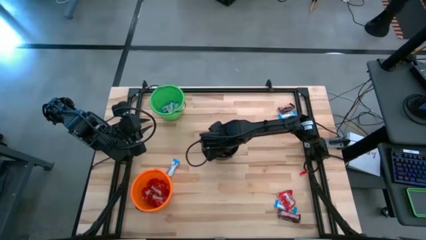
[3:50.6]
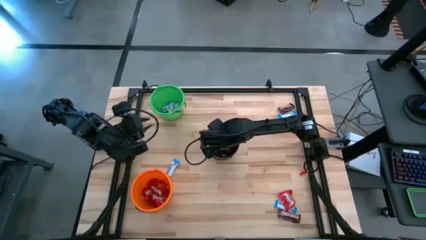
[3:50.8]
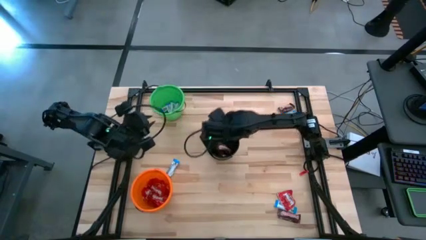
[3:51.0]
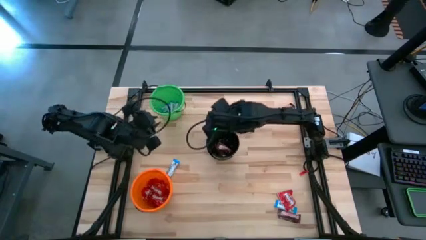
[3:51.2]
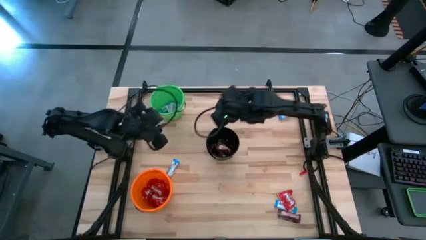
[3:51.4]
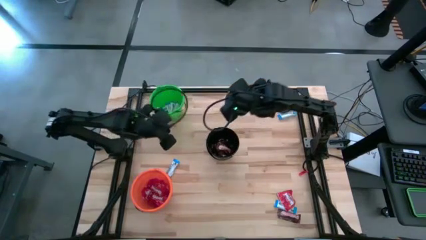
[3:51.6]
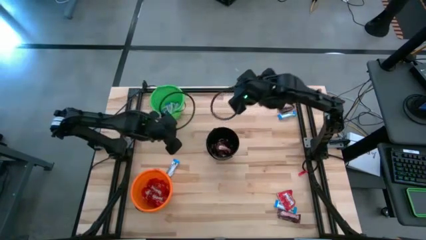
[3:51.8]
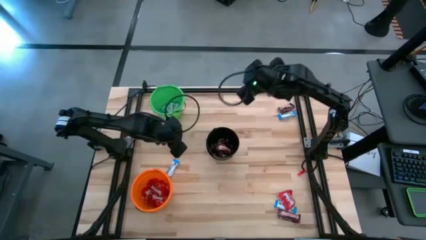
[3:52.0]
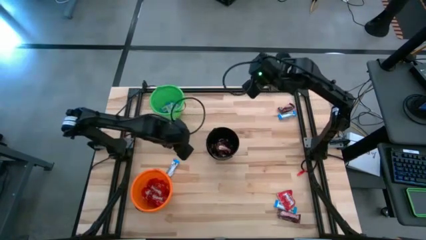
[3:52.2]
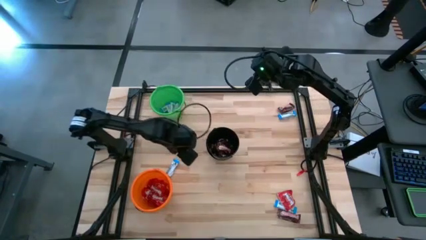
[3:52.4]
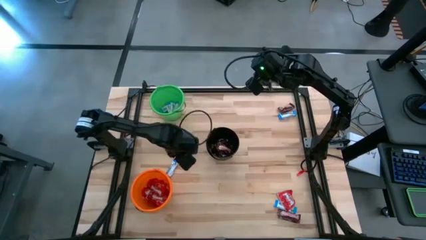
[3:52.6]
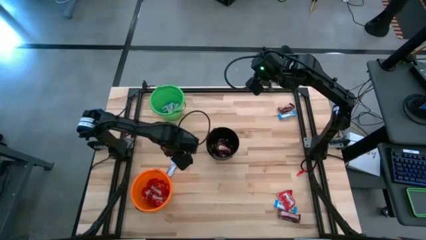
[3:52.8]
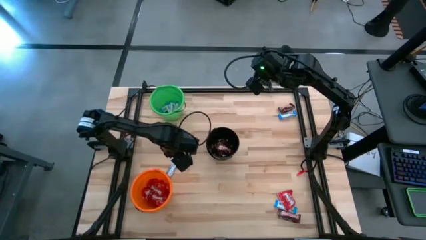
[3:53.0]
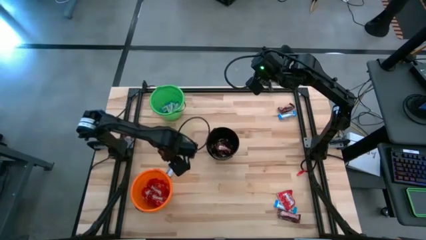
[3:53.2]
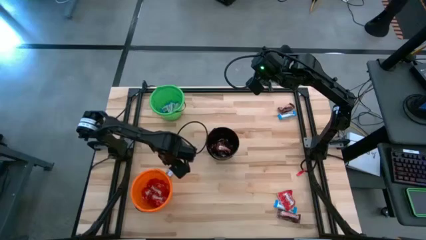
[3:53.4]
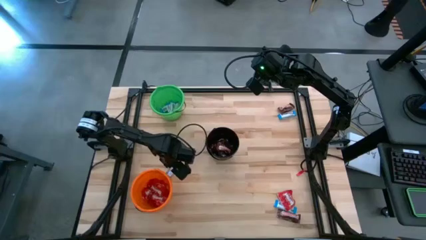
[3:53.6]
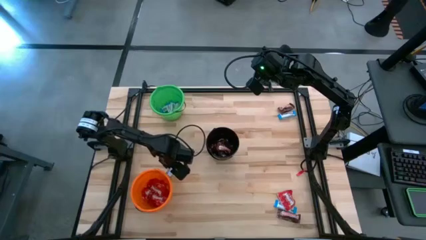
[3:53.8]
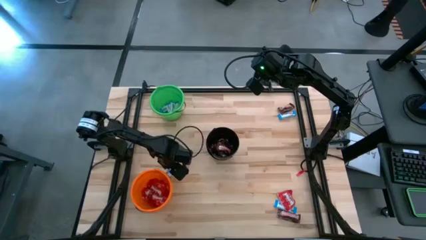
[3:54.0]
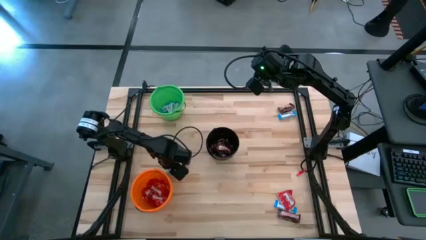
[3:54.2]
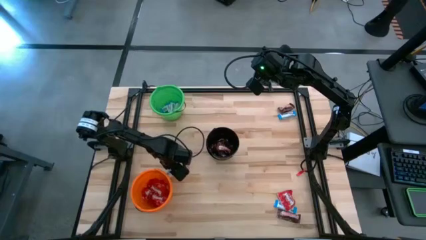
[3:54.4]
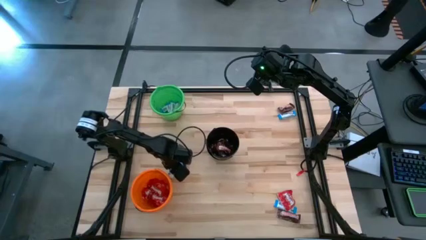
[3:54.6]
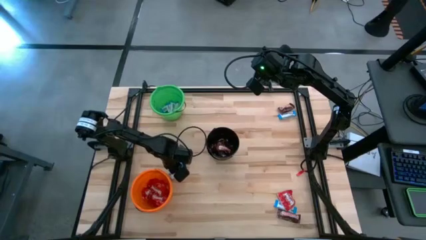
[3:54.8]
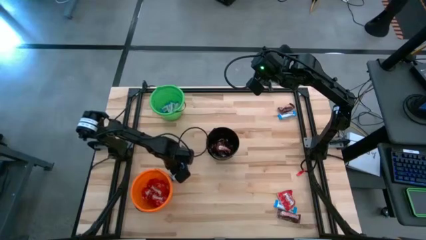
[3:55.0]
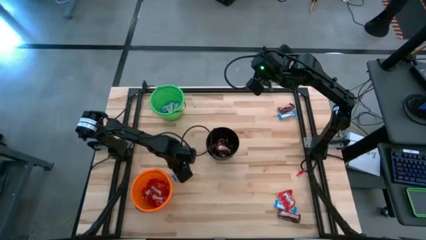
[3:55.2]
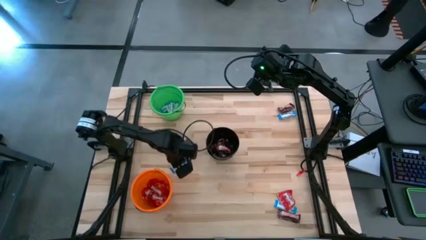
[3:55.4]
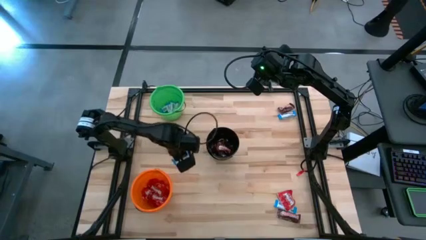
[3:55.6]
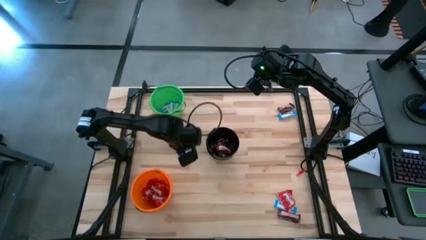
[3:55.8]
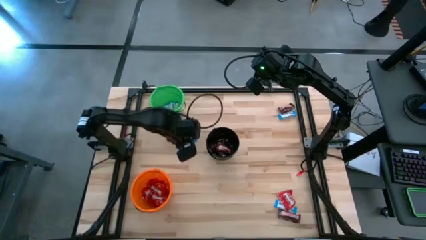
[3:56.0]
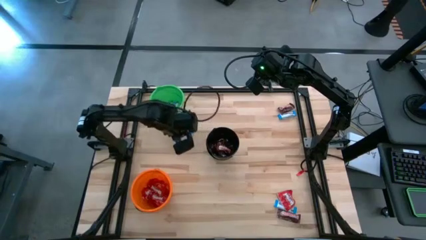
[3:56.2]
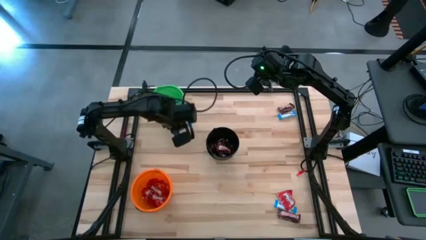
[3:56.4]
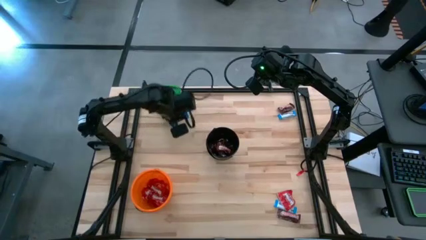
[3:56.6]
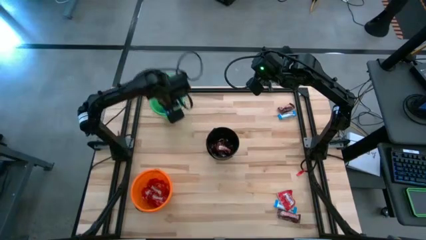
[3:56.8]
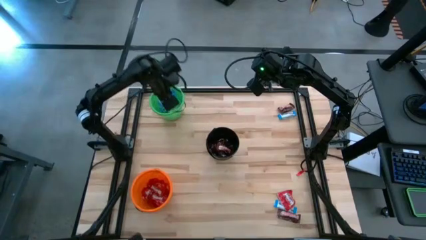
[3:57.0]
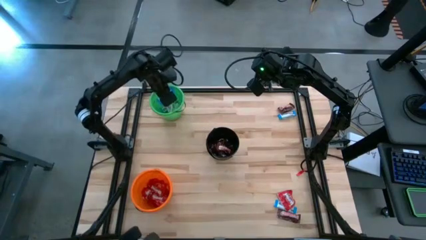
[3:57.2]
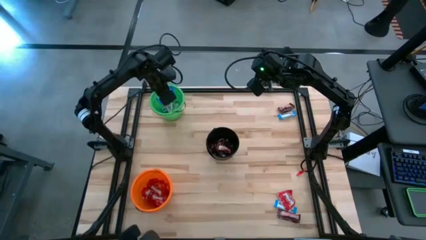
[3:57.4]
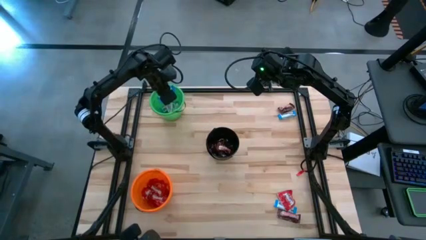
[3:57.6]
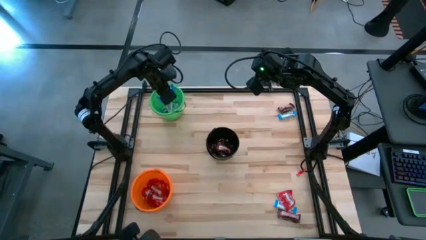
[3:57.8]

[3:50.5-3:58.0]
Task: Sort candy
Put the left white chocolate into the green bucket

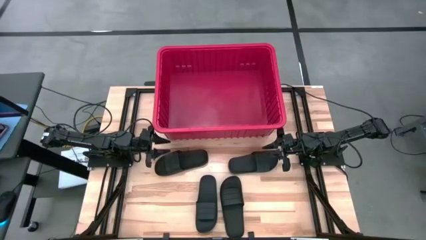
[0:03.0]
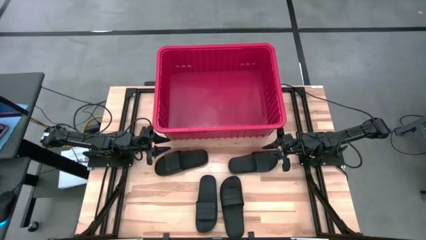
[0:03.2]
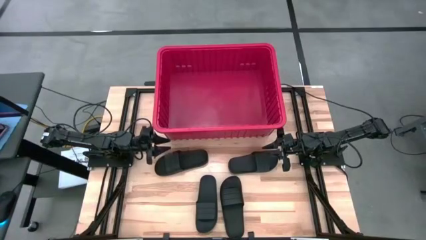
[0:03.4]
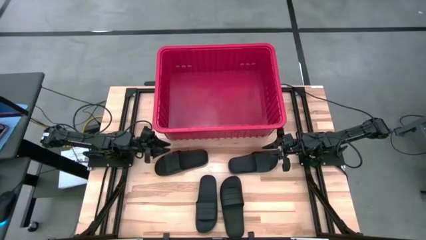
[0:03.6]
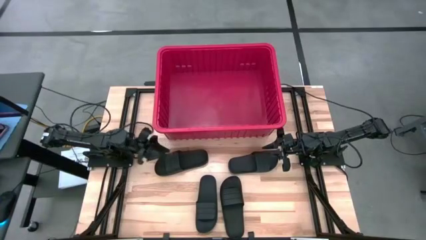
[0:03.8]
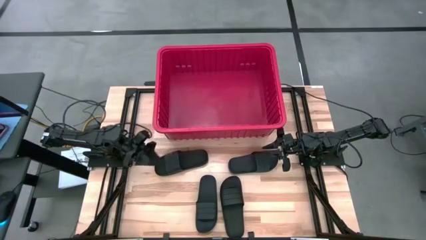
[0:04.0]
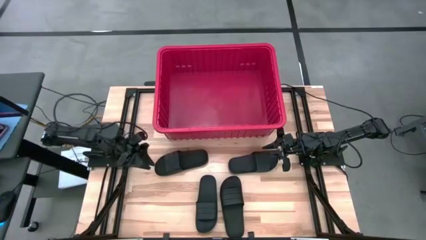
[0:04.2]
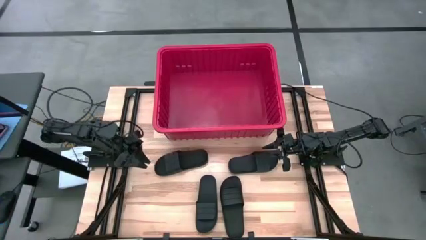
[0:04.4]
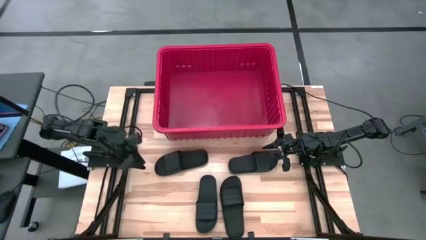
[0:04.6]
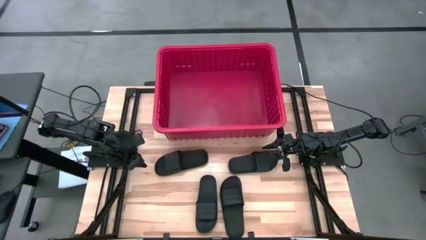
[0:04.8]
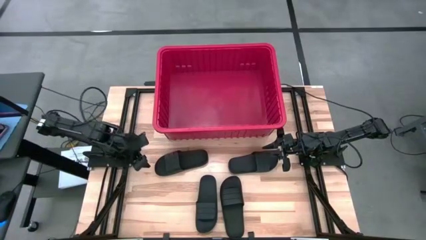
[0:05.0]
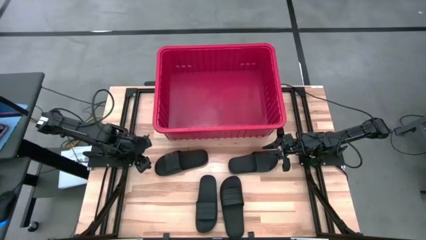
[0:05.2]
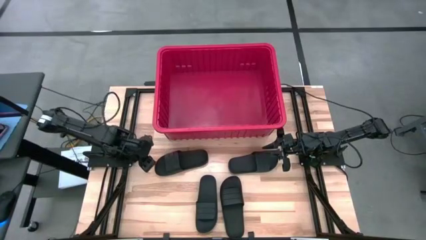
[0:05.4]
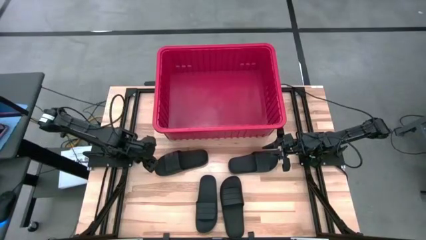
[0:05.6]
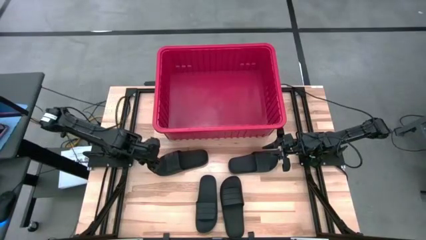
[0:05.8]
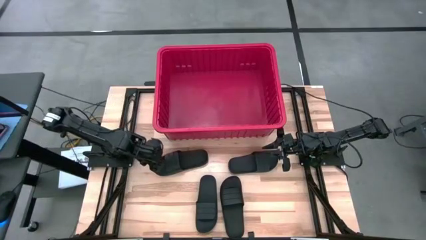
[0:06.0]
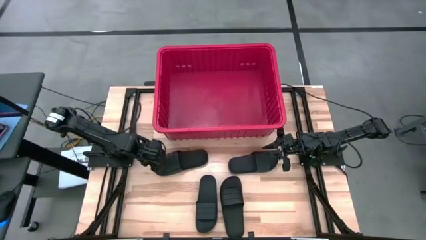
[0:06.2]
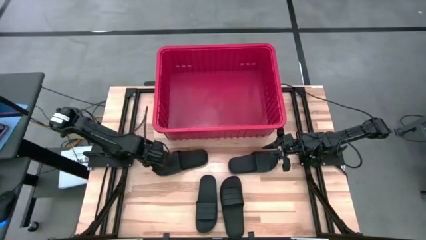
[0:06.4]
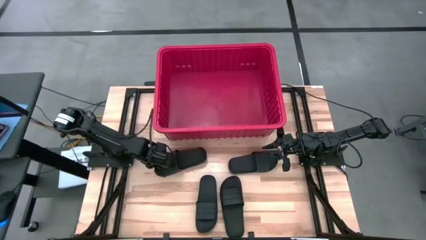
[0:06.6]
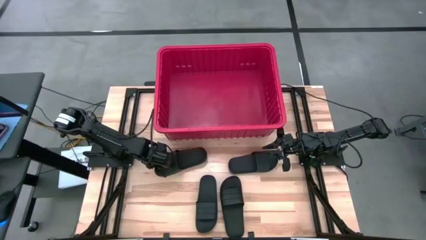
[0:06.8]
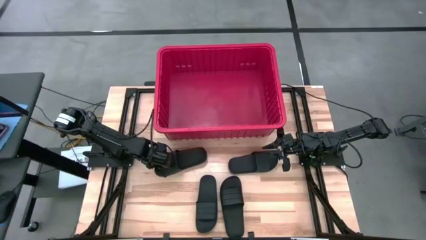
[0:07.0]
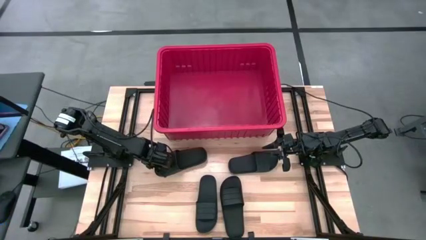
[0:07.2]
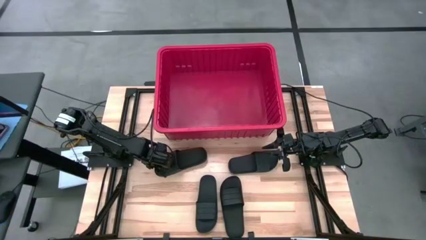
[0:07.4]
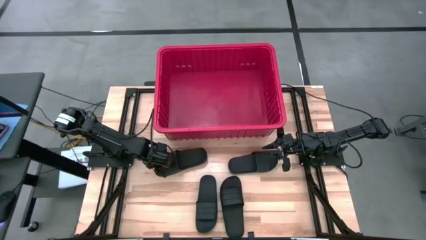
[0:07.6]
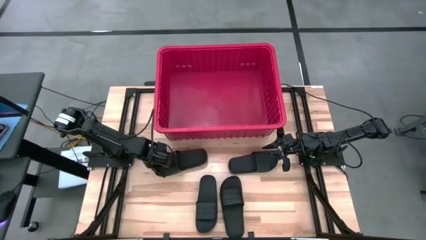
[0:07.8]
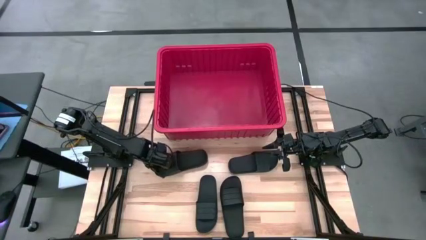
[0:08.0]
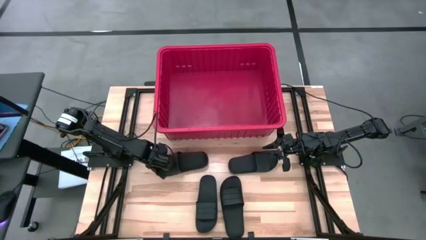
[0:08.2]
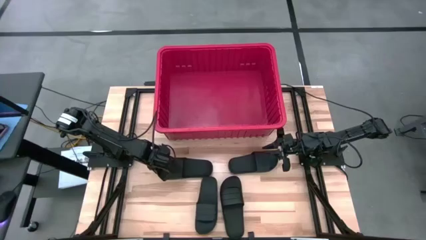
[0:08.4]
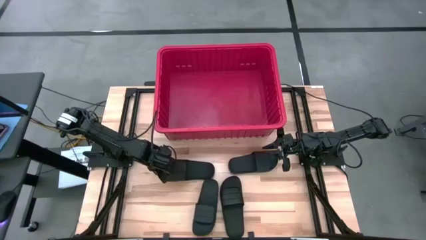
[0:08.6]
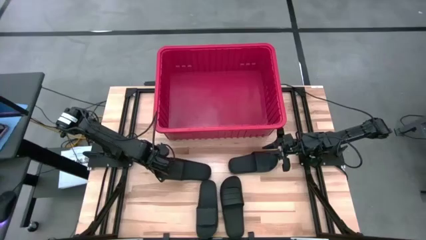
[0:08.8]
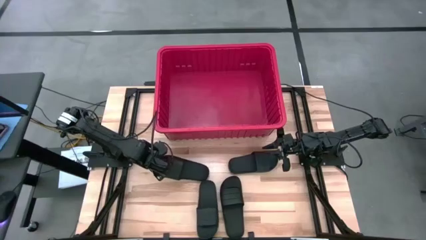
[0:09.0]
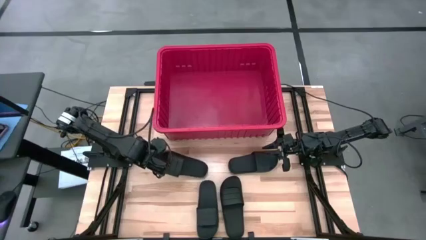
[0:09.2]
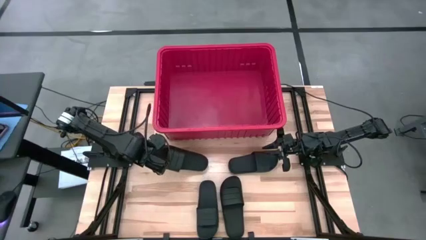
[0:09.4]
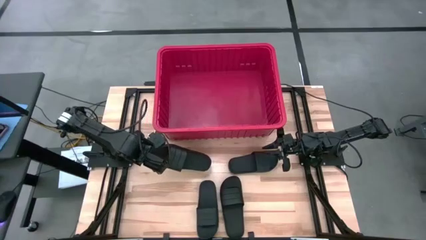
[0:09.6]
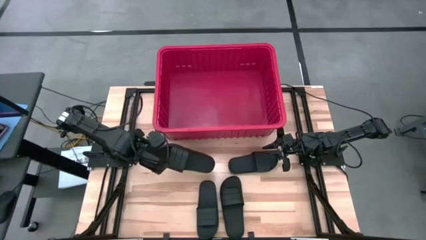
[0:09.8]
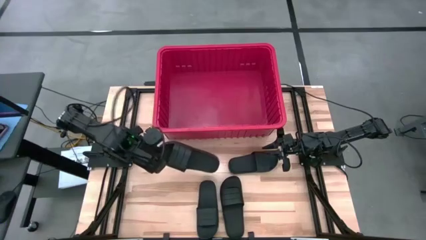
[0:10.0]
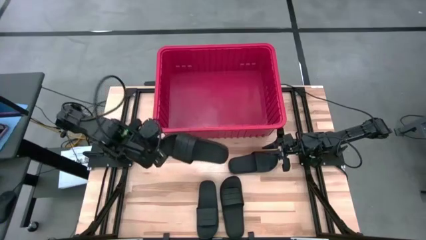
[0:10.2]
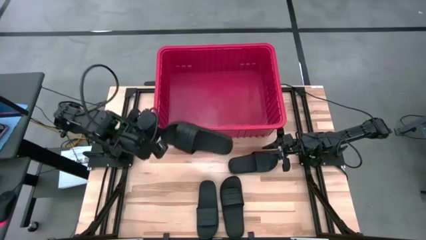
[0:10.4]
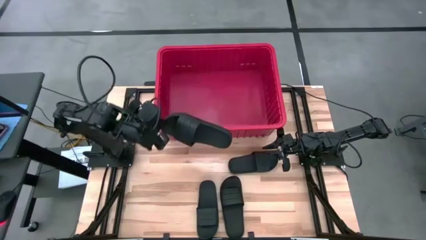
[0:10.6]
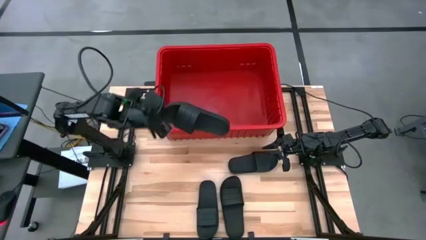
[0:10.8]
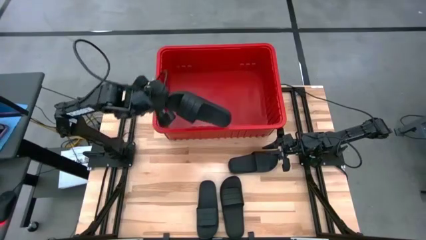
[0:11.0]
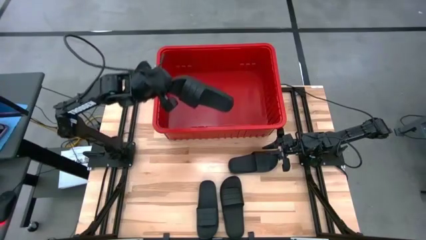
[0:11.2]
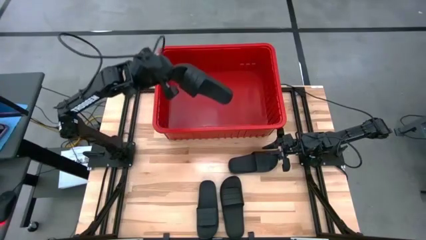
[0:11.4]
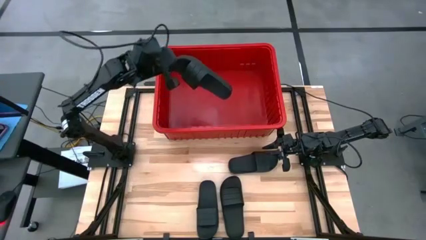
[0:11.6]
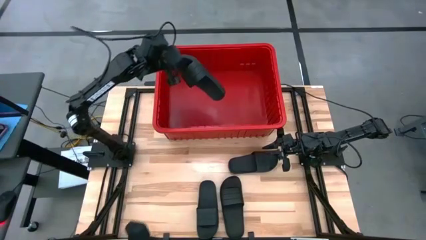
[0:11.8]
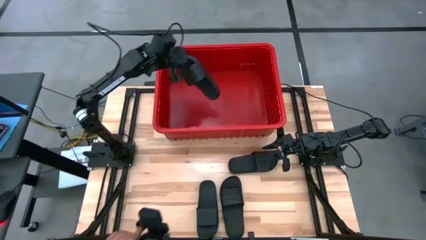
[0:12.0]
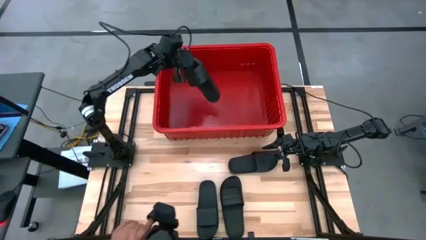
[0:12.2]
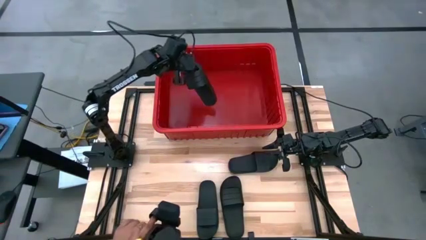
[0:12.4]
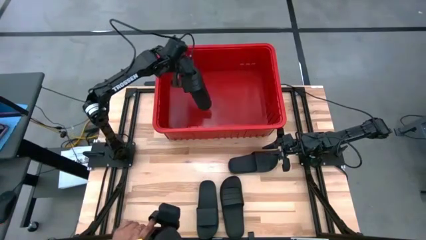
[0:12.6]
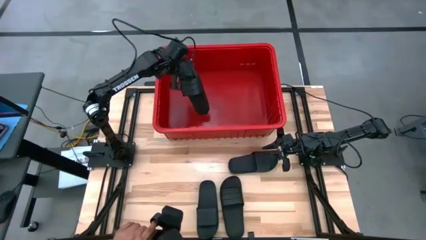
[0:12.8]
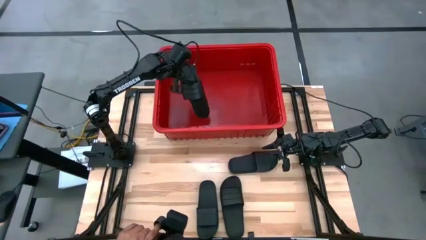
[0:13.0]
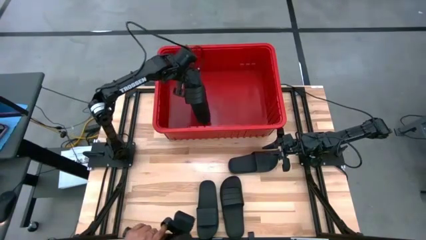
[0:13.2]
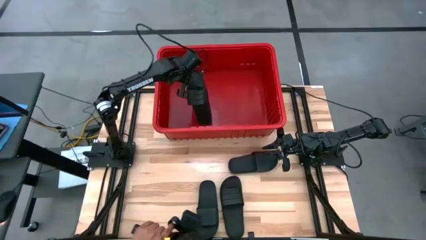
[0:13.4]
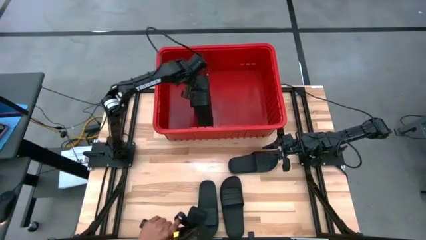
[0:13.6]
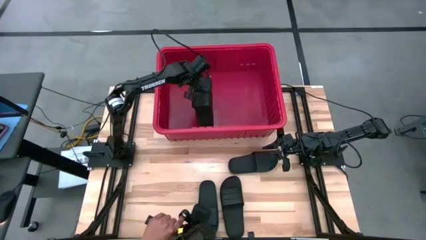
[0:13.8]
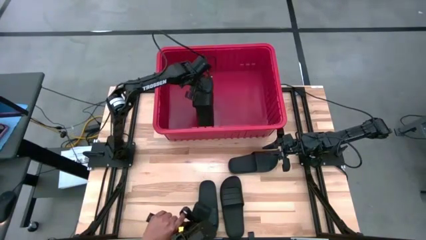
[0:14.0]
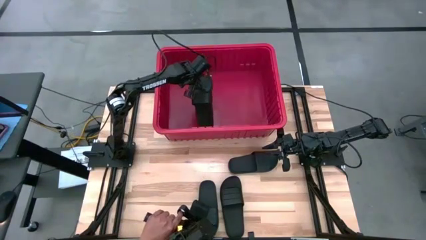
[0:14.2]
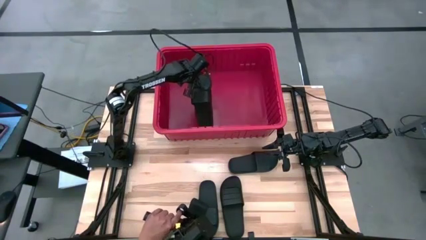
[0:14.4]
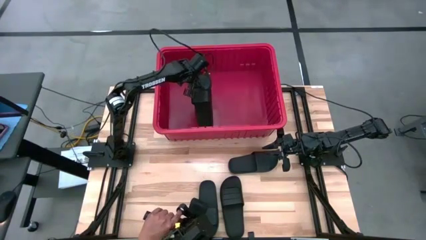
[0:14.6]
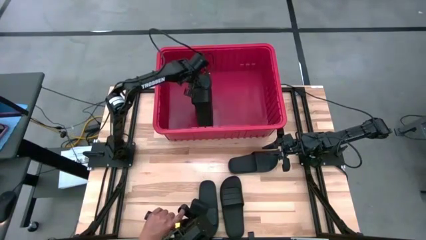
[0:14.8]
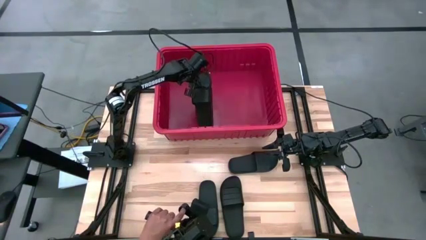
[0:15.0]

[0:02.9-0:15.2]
Task: Pick and place slides into bin
Put the black slide into the red organizer bin
